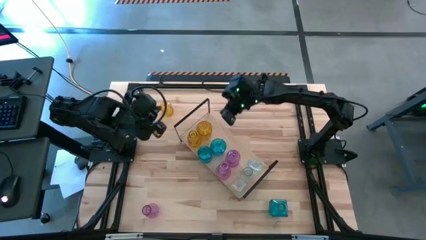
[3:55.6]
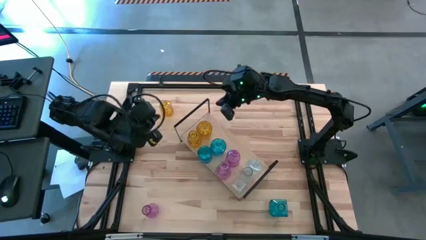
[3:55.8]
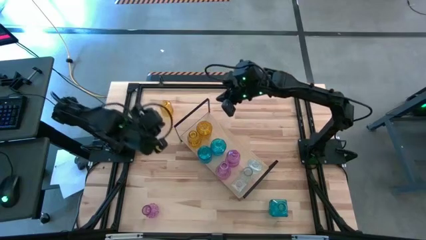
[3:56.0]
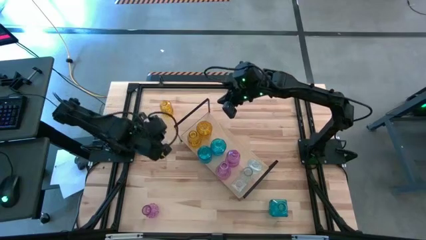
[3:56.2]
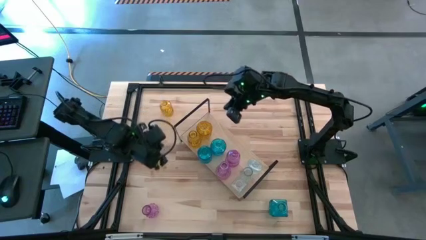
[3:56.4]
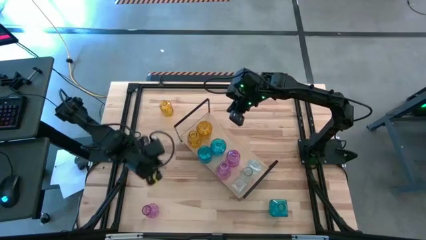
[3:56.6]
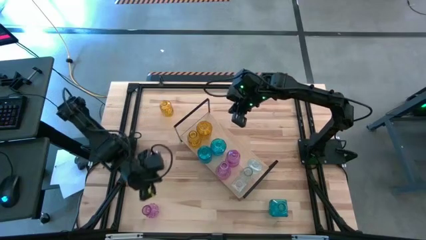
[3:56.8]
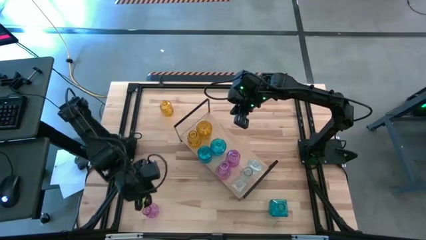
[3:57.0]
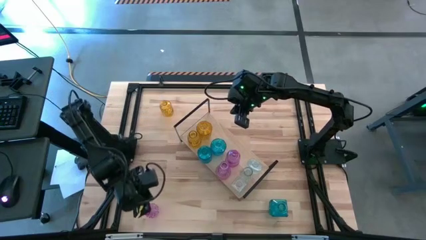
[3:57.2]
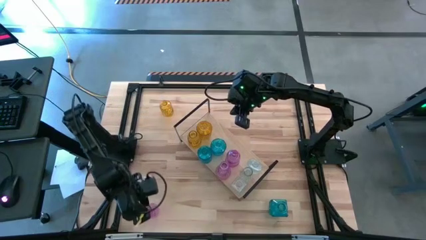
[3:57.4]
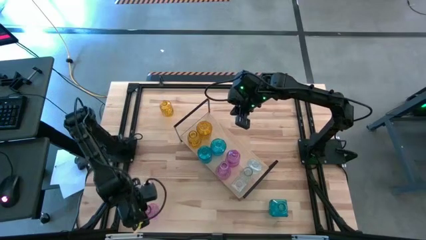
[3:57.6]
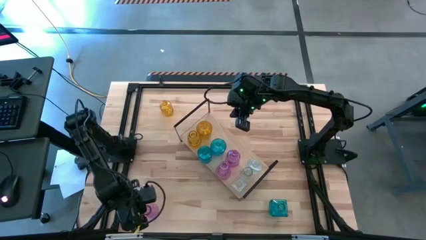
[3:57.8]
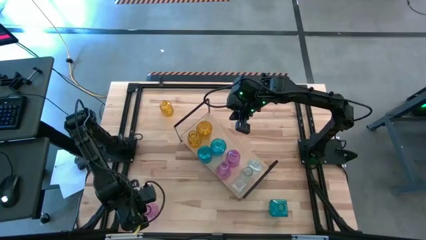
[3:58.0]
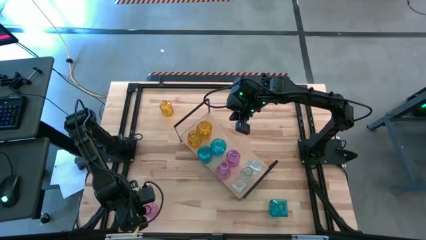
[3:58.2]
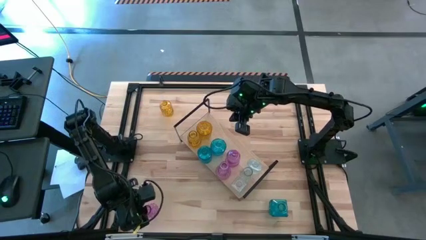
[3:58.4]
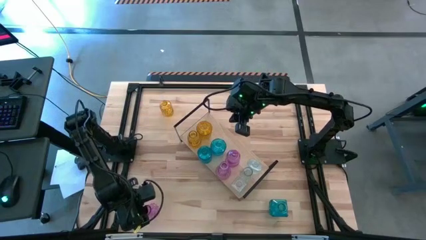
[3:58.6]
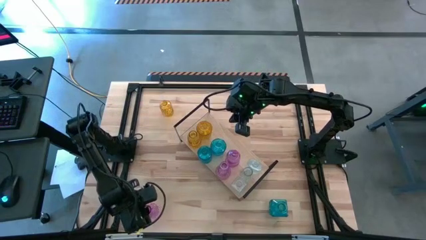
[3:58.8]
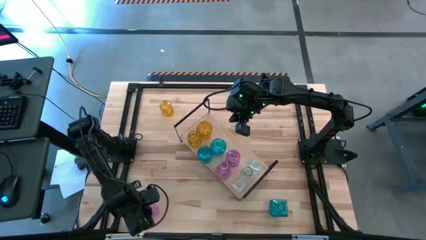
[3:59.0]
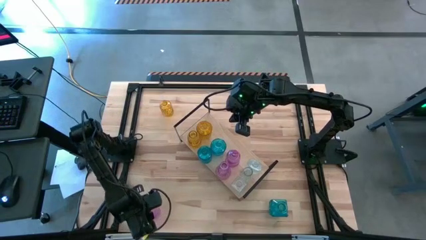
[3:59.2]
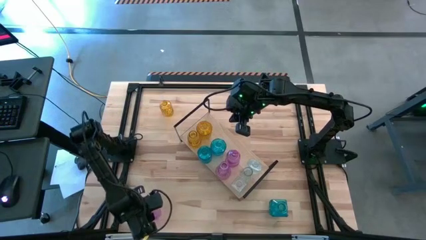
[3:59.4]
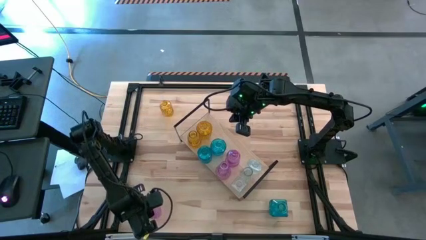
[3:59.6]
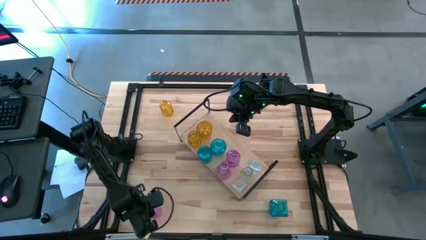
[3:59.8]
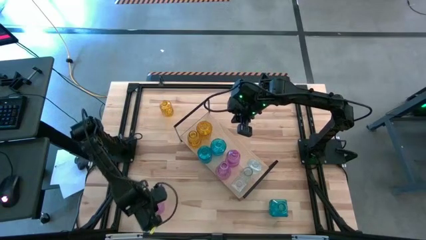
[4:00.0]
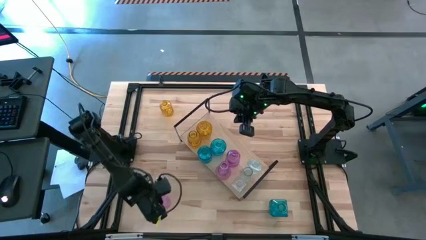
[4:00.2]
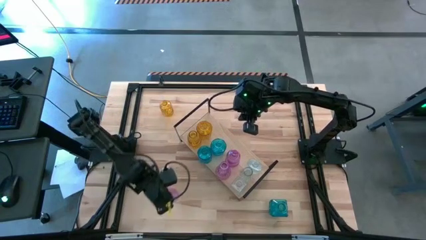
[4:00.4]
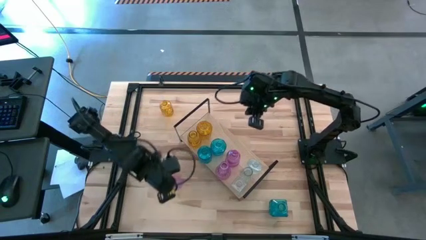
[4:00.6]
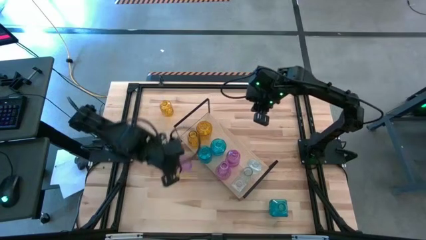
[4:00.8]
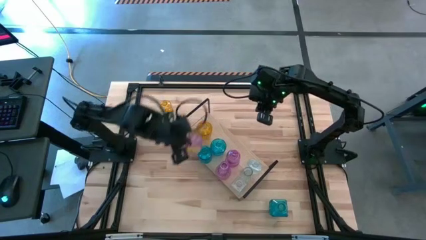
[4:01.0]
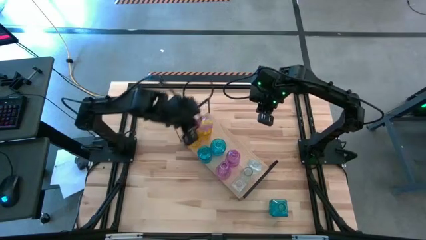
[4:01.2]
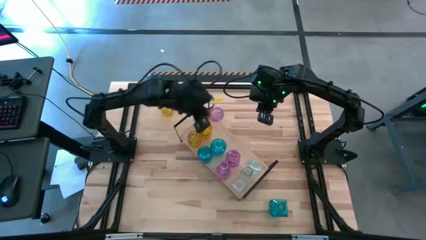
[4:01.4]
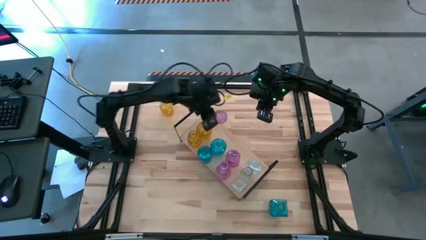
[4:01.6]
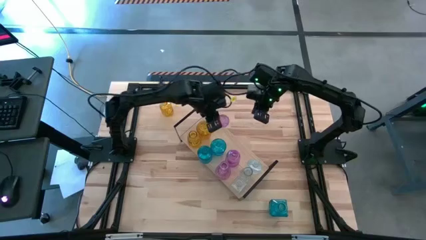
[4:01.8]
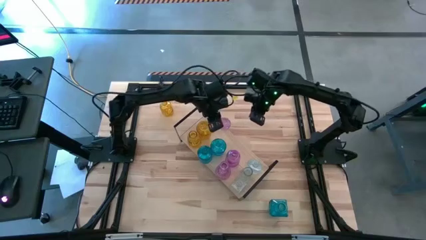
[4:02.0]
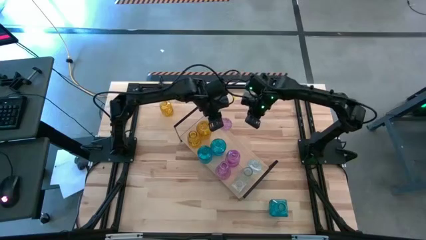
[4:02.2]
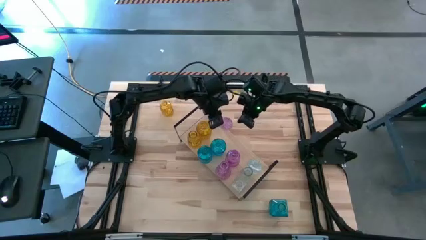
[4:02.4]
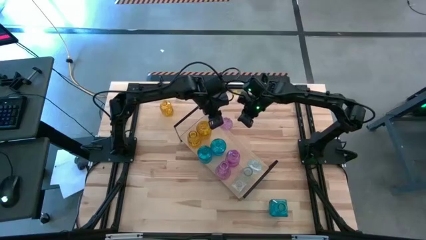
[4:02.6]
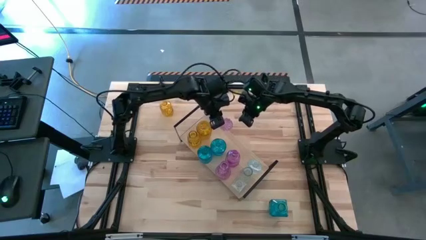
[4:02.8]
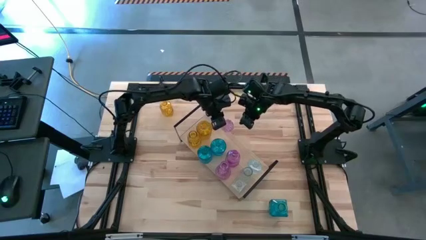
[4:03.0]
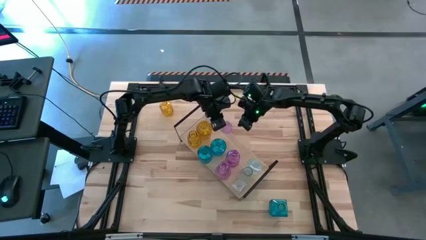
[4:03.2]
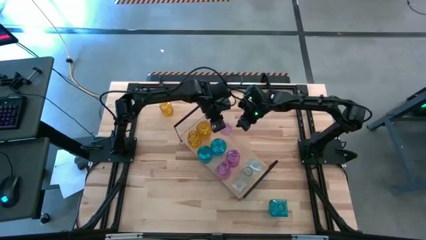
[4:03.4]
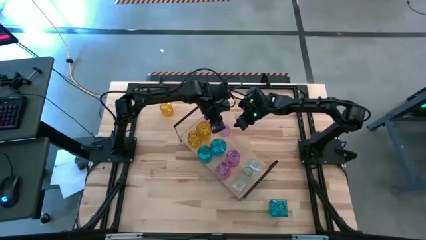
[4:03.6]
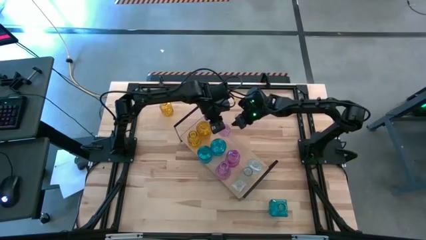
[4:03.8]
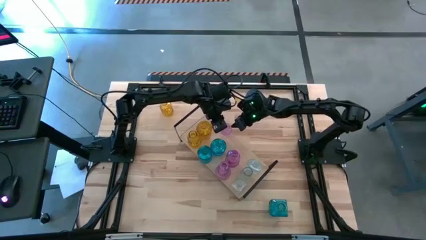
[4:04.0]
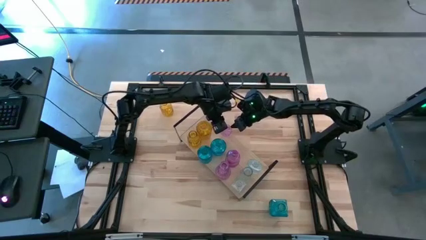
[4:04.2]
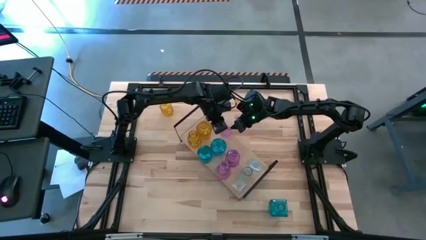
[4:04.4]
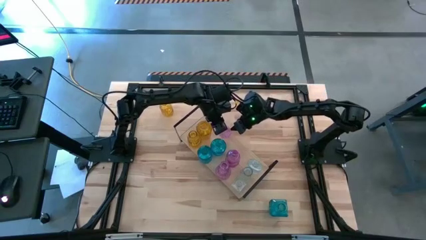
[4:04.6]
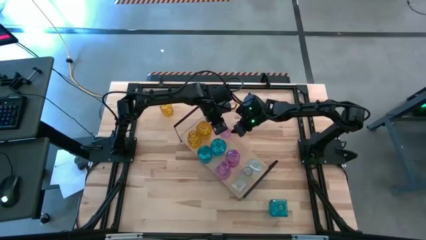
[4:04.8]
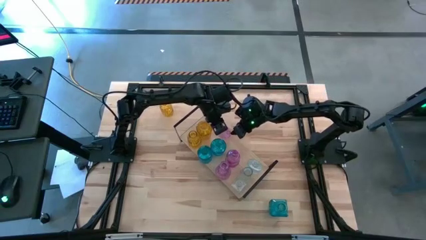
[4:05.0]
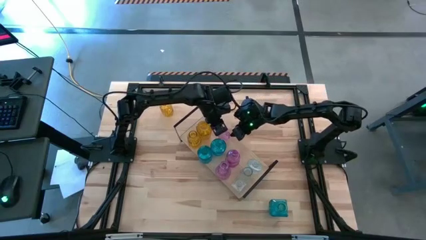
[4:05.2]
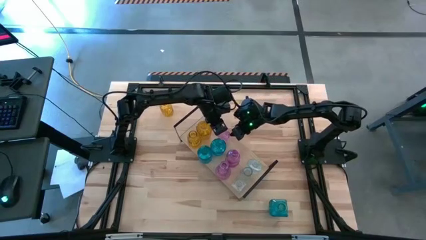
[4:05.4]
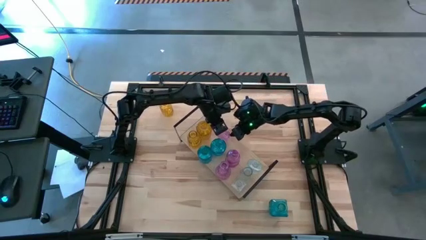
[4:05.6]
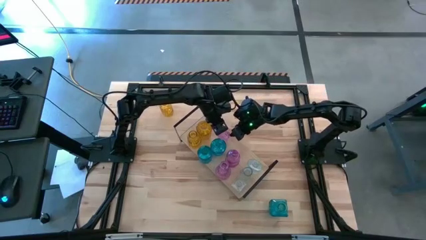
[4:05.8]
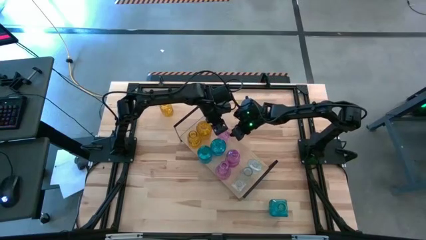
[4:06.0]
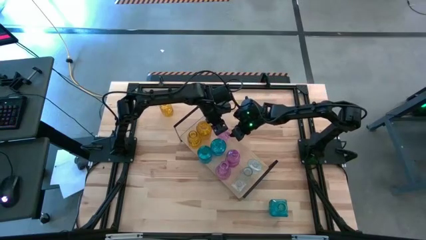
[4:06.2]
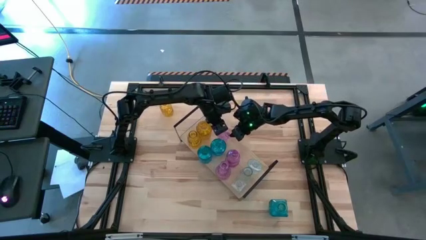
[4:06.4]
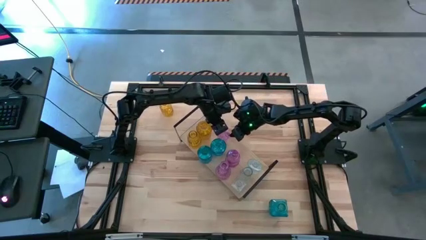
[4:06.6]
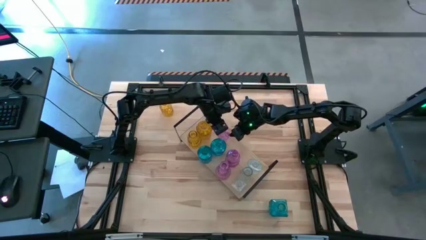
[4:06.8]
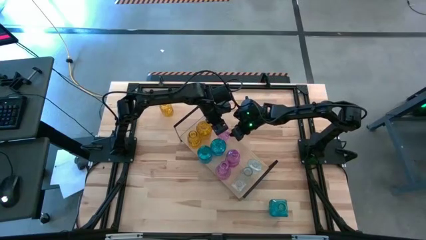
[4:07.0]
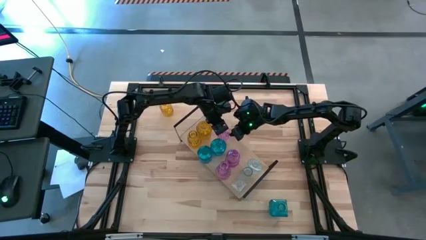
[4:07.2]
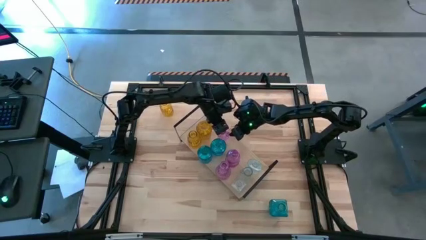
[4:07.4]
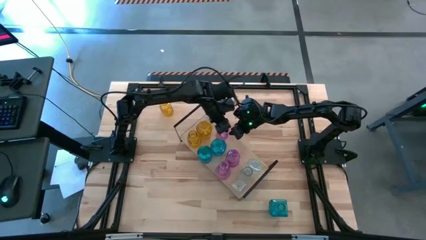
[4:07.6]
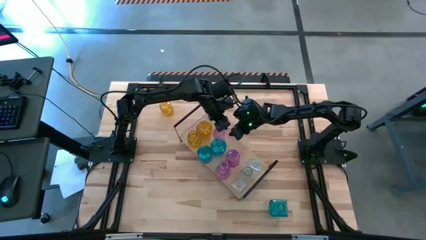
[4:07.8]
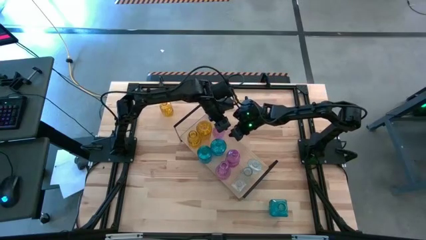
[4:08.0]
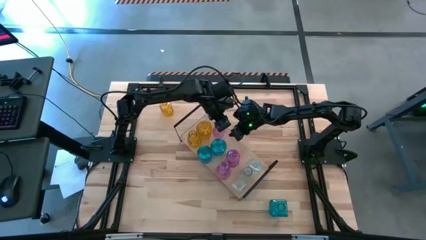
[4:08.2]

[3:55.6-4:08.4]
Task: sort vases onto shelf
Put the pink crystal vase on the shelf
